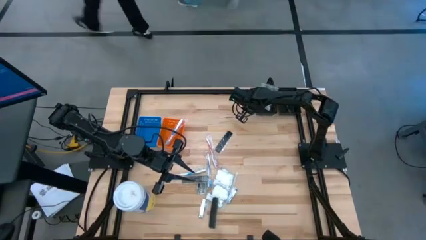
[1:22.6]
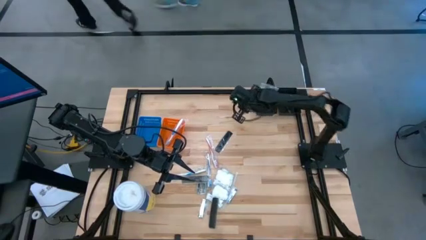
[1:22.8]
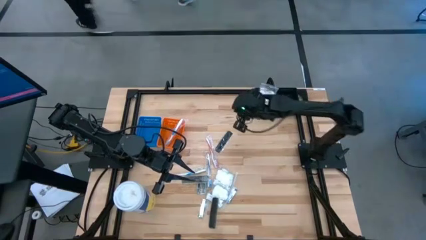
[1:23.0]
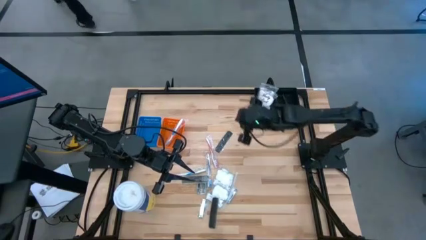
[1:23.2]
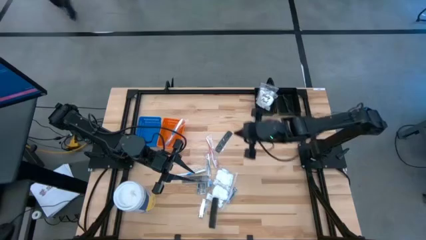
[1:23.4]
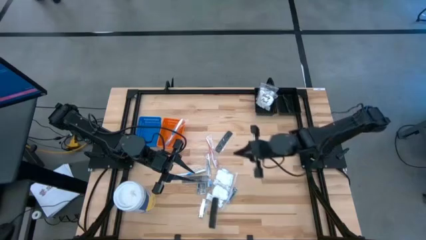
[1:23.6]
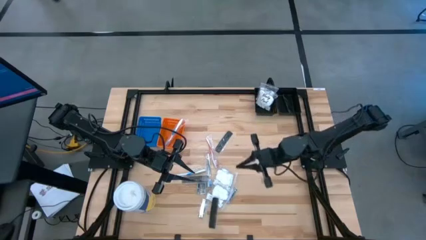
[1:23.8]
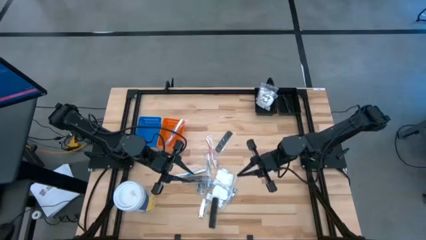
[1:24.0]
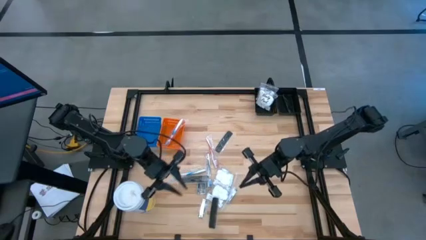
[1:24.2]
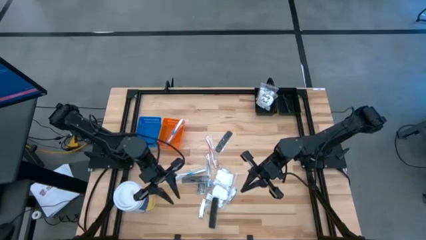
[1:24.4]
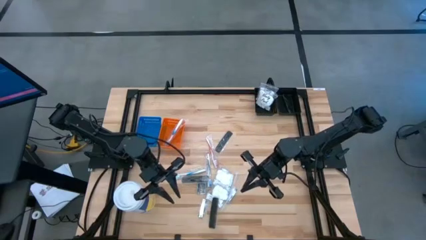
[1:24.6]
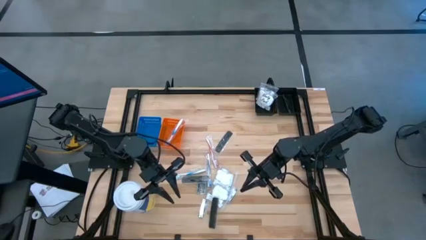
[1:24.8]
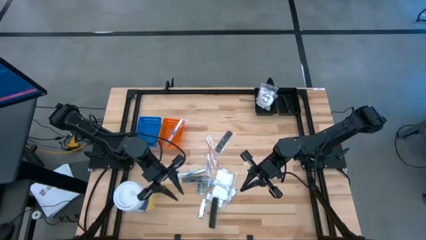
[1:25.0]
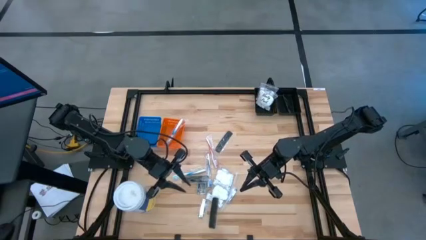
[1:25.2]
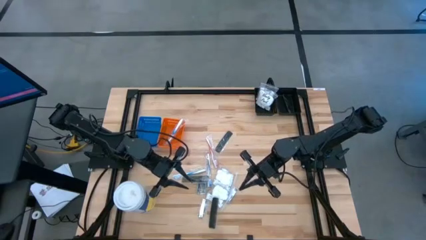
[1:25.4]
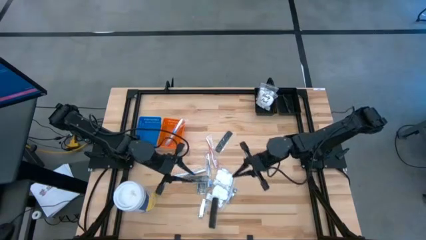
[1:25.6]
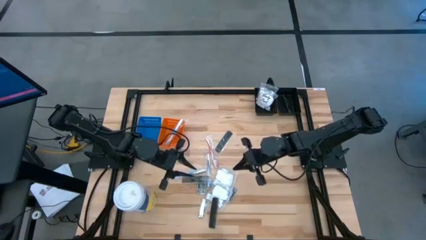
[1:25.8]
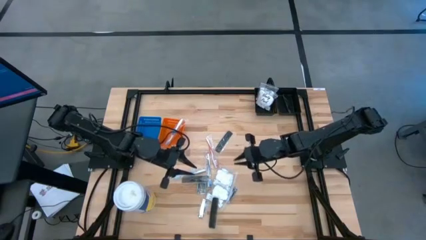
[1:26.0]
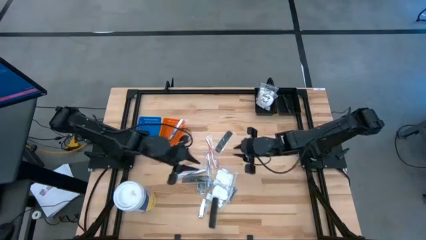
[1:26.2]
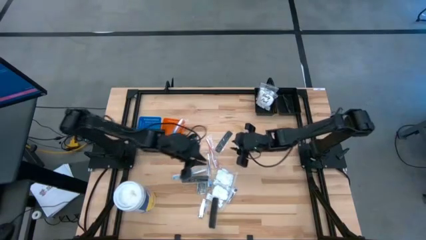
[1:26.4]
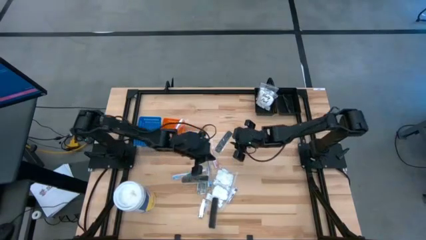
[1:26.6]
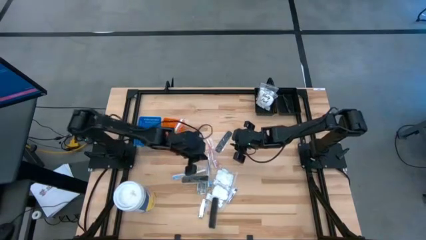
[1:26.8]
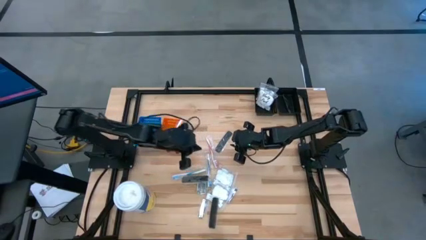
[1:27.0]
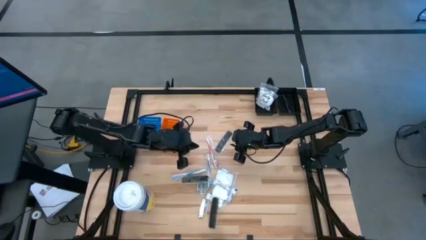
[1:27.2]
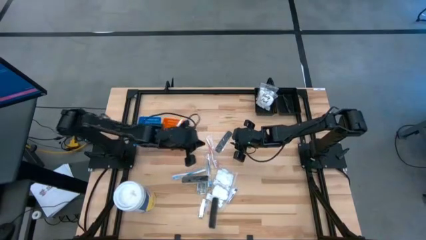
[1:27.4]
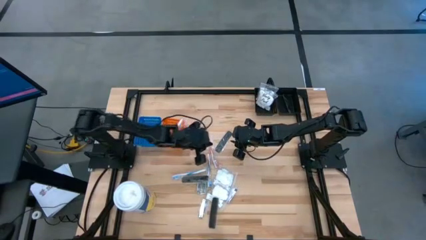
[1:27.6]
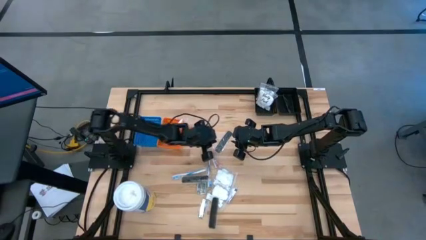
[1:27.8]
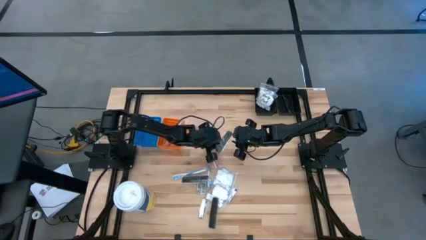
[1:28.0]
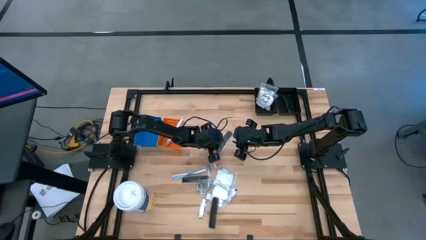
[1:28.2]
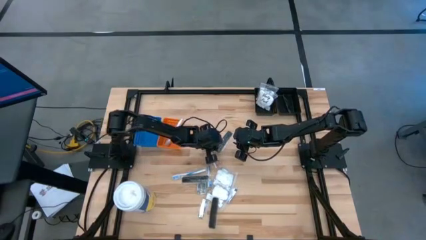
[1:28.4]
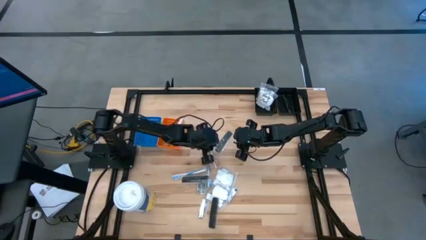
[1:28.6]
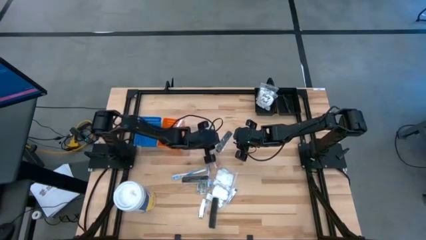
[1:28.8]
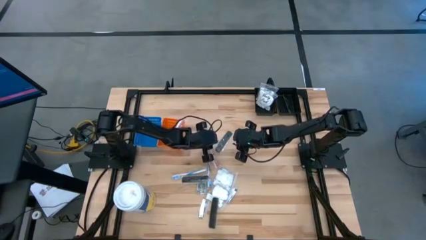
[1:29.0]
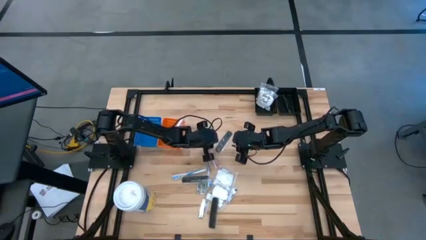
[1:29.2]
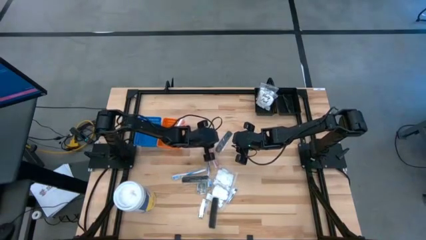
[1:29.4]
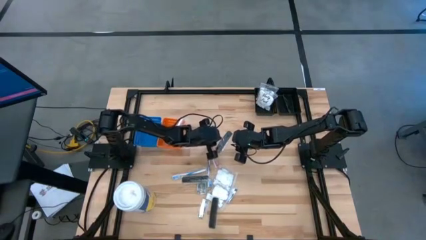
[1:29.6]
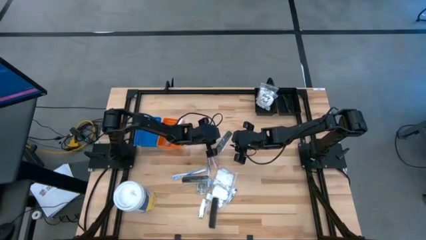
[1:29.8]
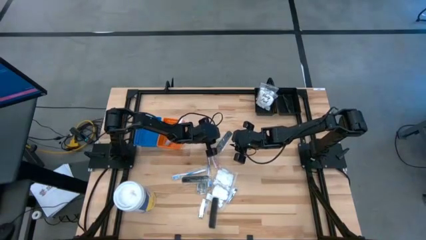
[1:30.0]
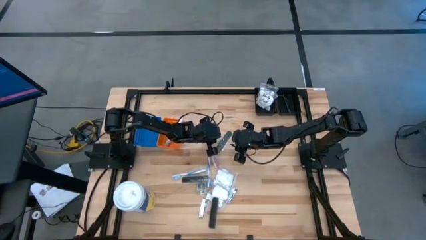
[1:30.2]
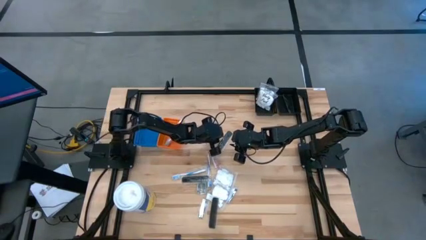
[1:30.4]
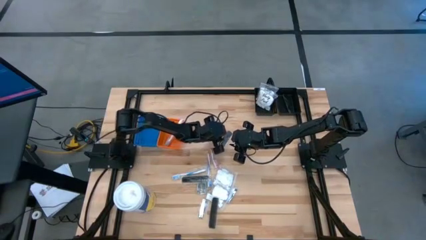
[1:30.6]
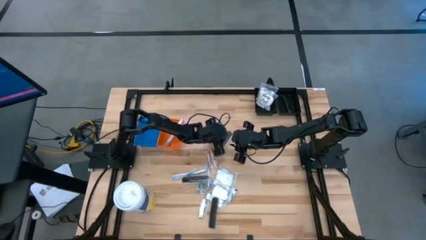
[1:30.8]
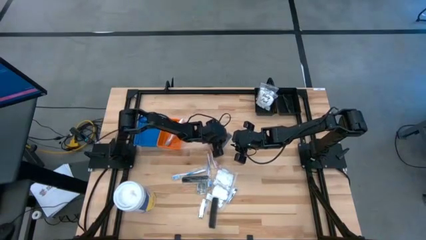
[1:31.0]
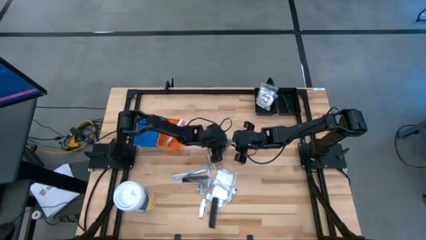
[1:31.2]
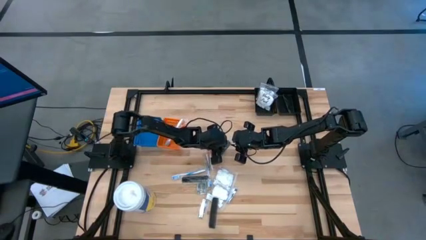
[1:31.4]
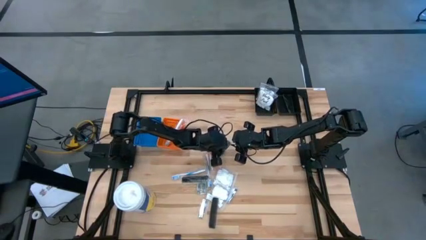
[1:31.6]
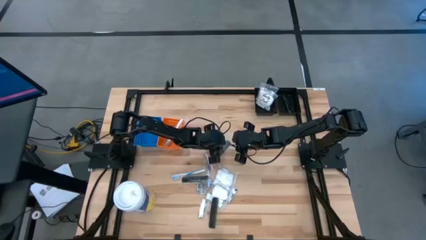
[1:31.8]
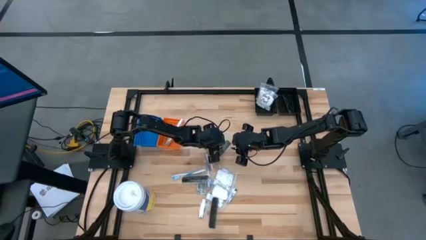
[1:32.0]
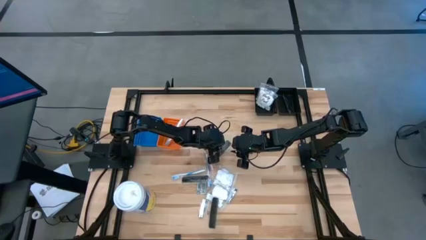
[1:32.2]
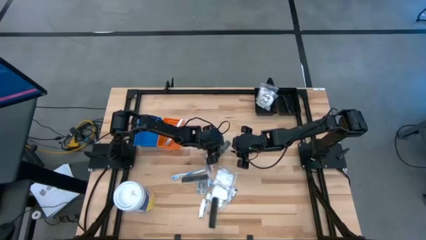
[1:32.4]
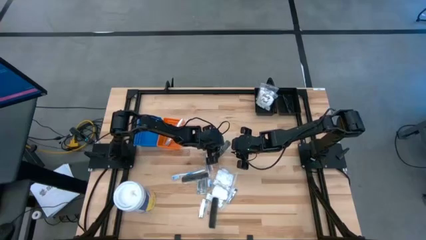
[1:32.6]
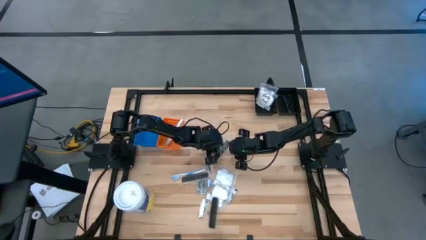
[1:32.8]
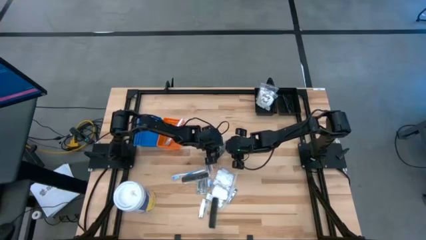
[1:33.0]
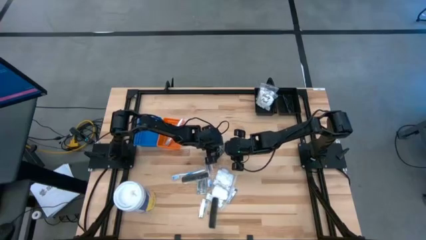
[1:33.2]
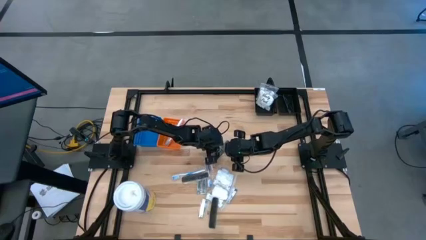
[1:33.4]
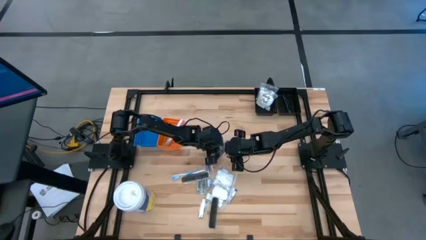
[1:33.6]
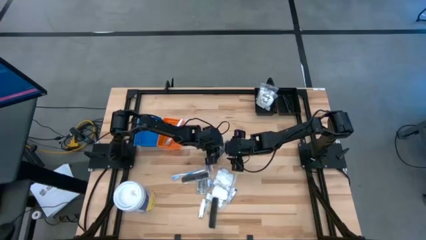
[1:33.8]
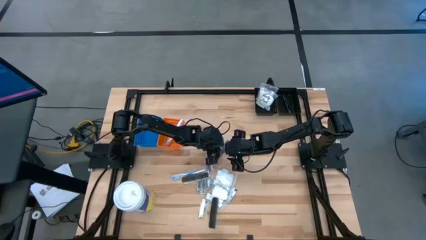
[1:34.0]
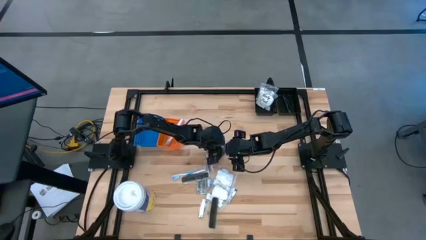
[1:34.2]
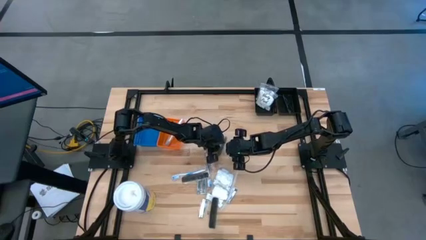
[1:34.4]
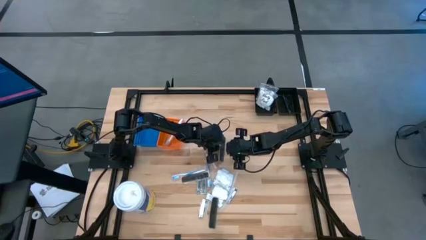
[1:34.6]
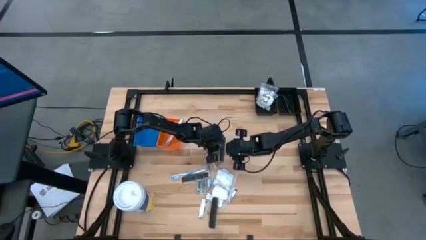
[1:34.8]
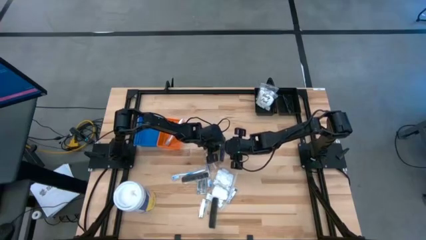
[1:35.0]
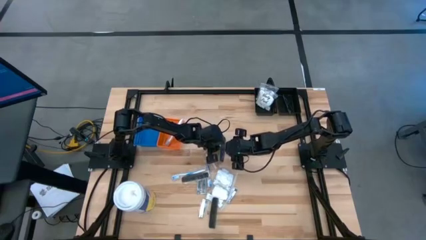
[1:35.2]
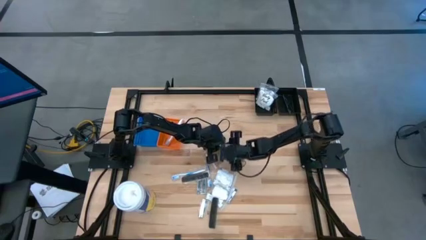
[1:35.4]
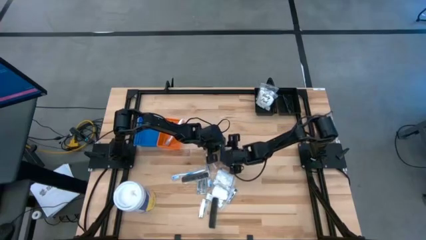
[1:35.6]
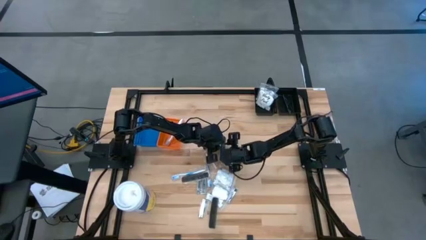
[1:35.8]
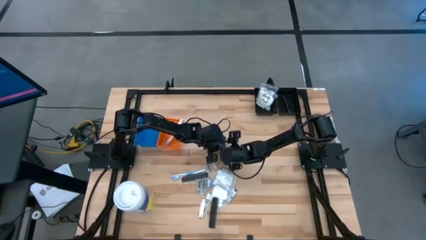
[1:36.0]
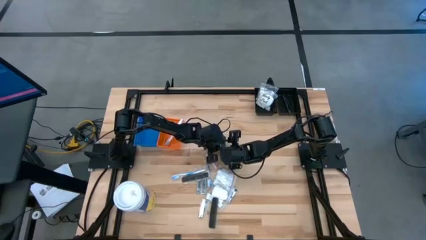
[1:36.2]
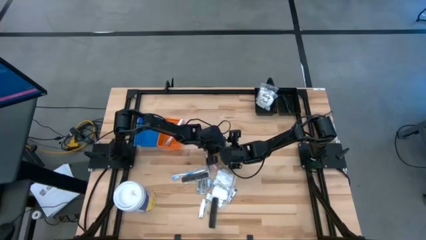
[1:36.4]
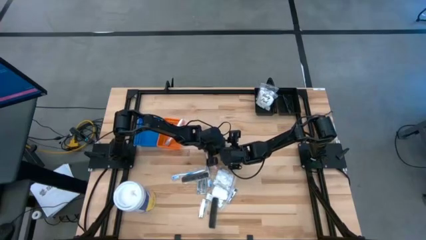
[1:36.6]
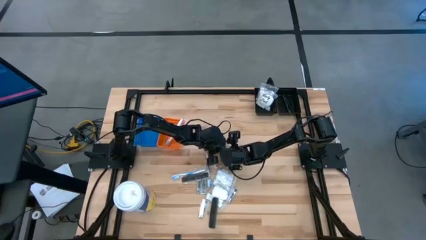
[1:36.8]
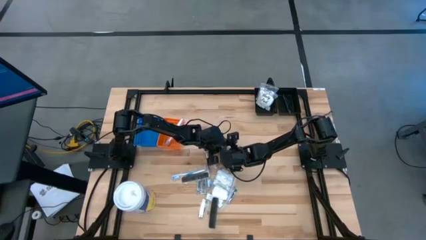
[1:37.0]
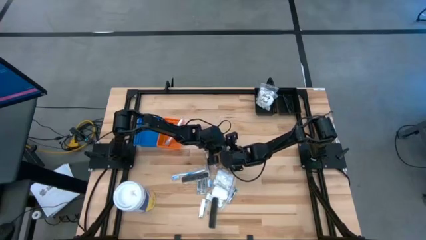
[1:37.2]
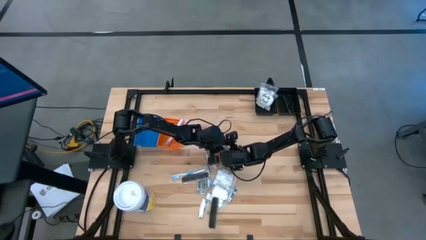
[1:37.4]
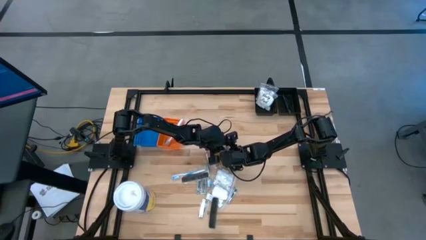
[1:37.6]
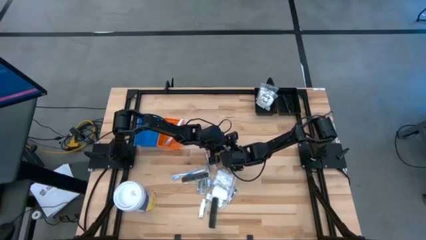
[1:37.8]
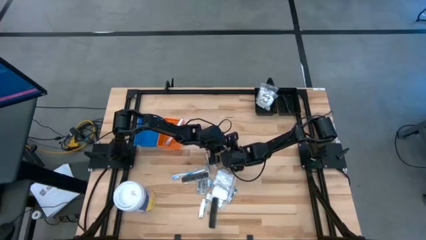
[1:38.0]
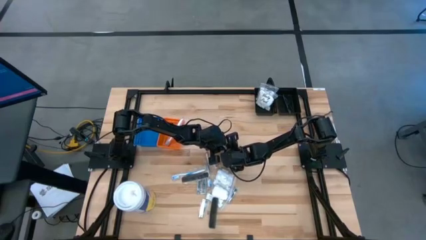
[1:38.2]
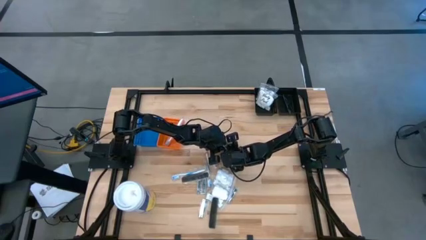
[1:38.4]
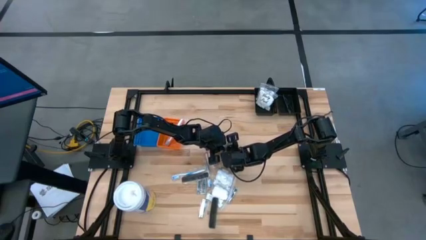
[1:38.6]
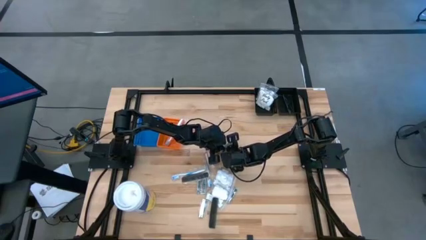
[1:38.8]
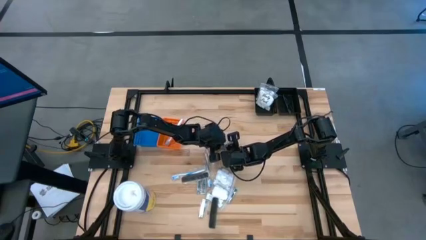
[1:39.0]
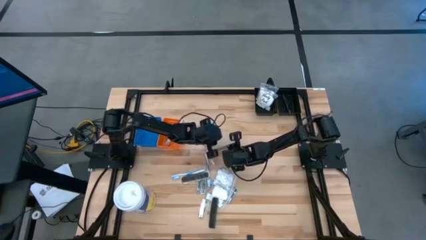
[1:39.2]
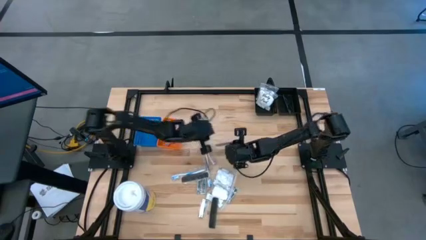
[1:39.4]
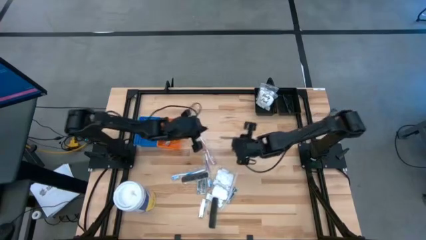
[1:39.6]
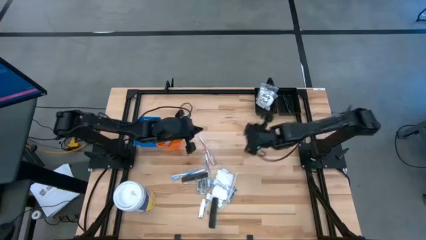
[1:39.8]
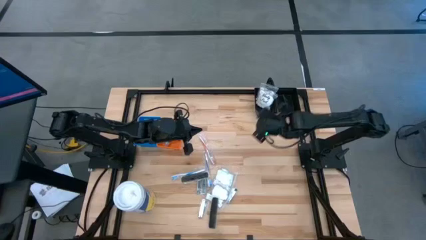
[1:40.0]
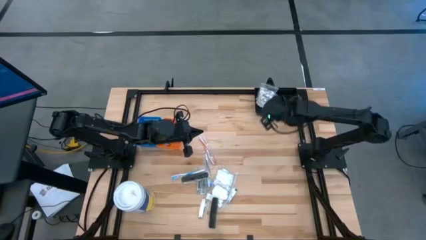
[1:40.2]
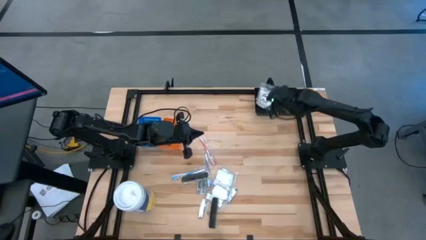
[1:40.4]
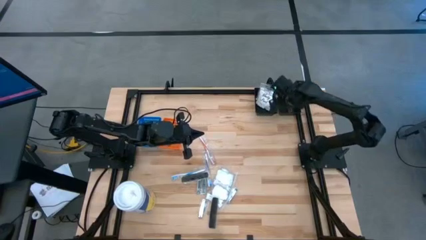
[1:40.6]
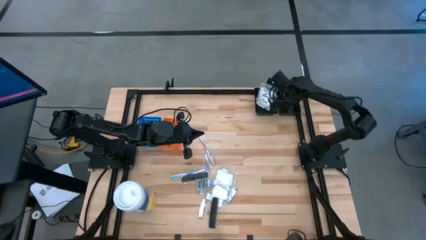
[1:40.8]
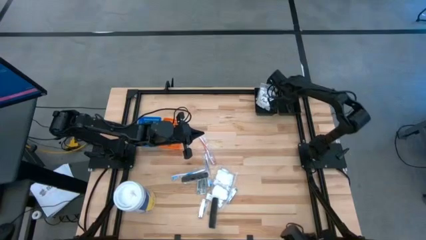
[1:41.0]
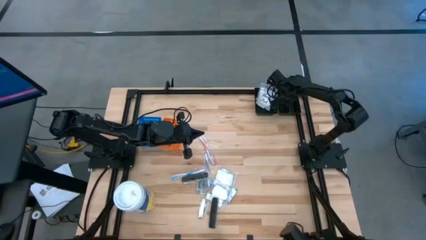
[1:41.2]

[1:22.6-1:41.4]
Task: Pick & Place Travel size toiletries
Put the black comb into the right black bin
